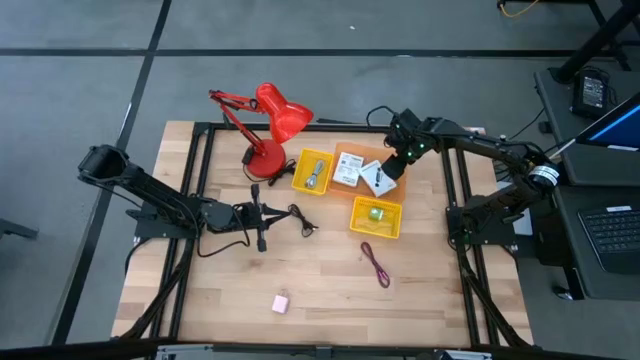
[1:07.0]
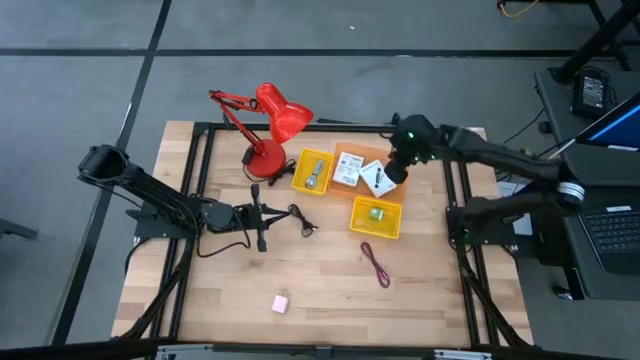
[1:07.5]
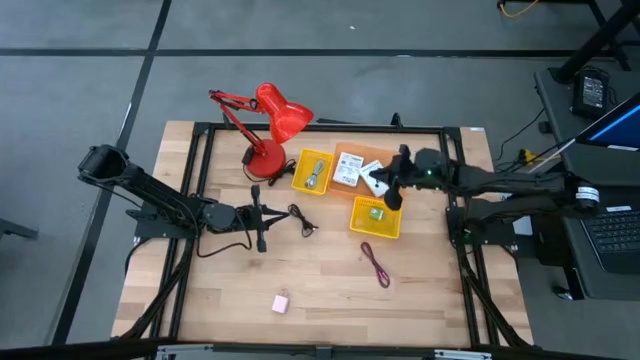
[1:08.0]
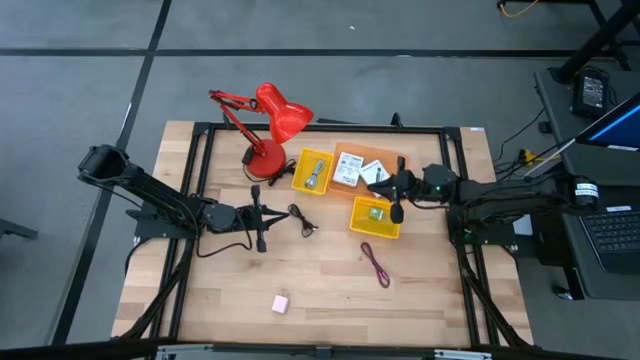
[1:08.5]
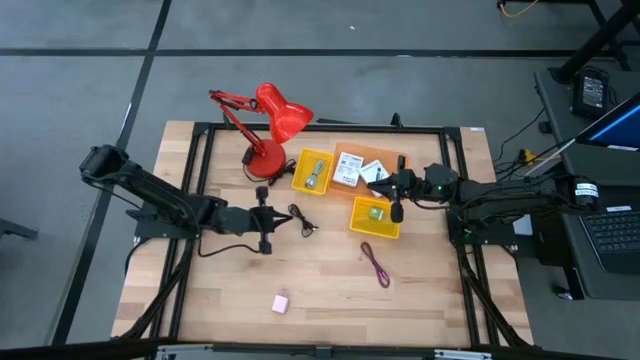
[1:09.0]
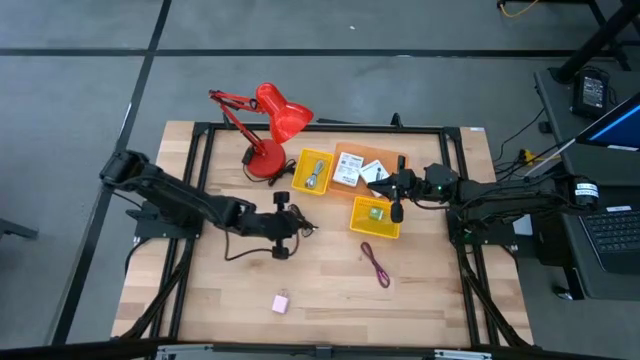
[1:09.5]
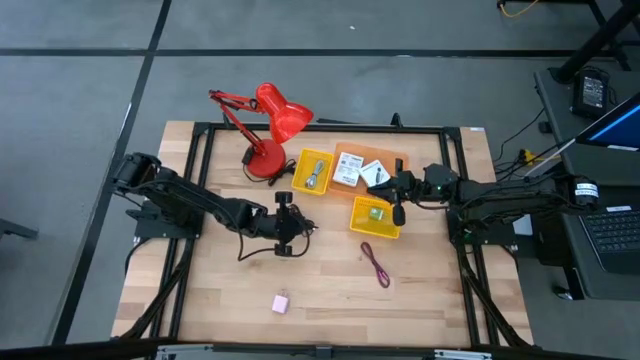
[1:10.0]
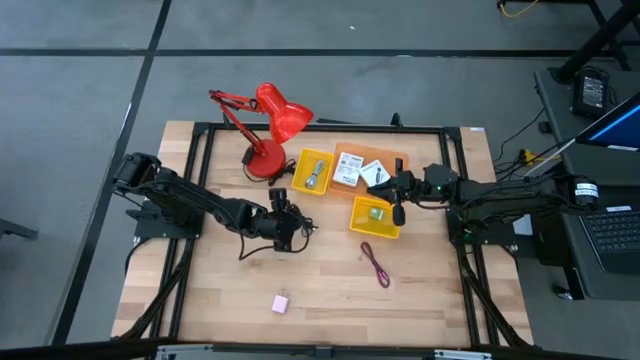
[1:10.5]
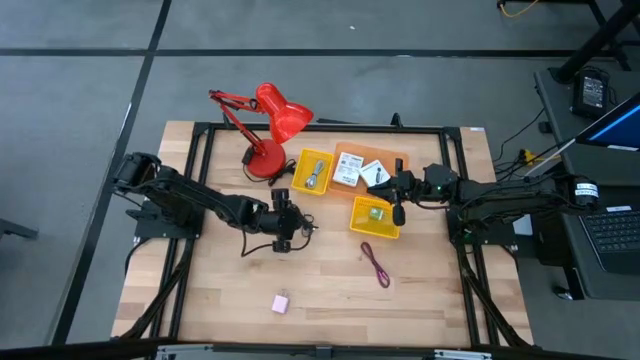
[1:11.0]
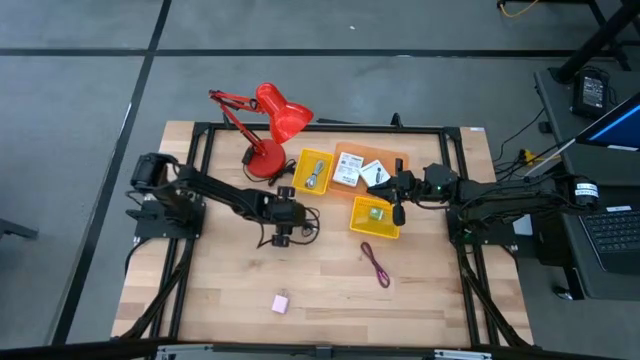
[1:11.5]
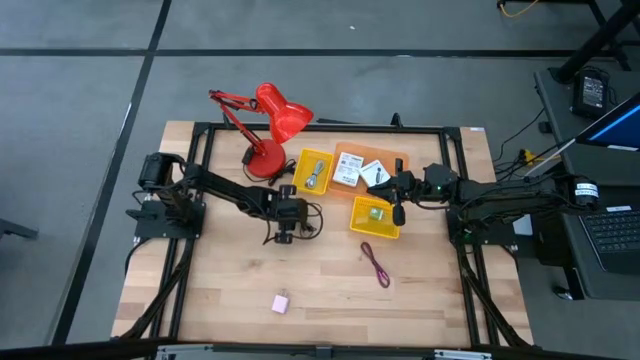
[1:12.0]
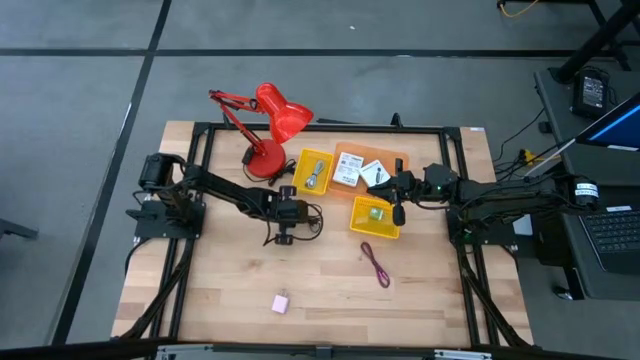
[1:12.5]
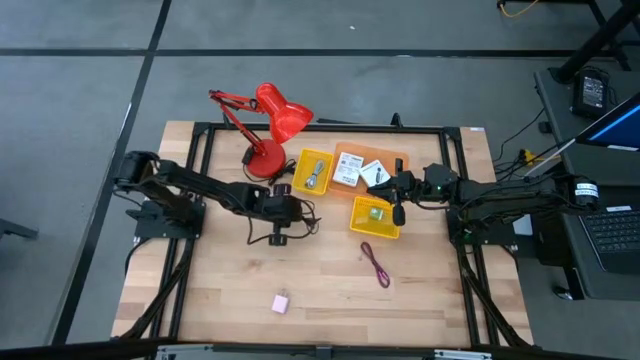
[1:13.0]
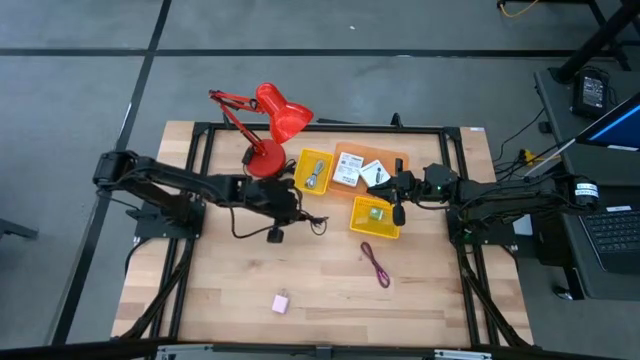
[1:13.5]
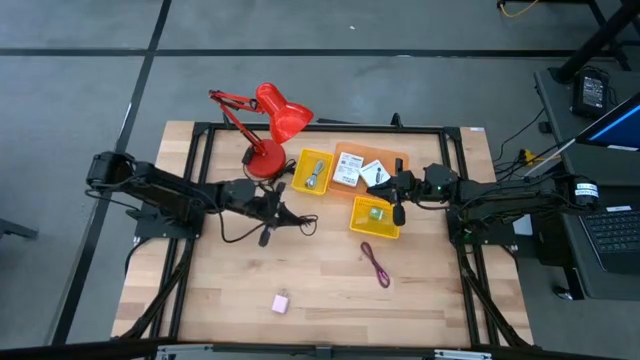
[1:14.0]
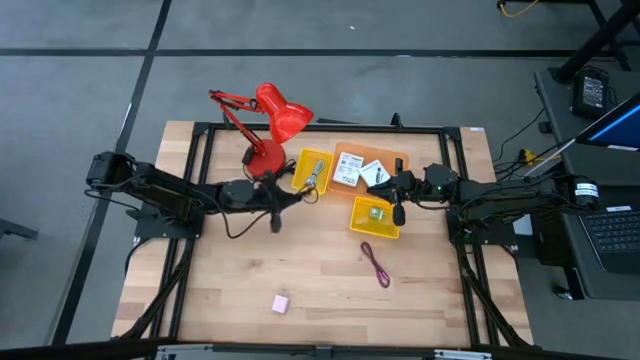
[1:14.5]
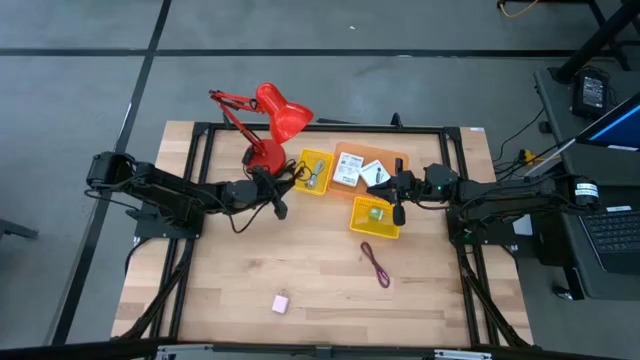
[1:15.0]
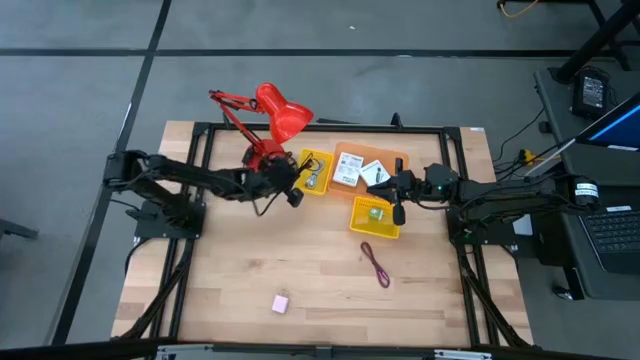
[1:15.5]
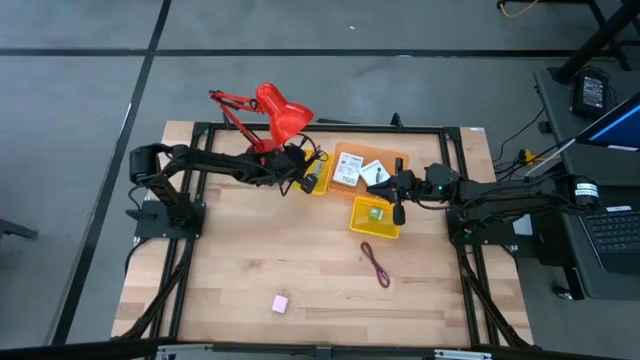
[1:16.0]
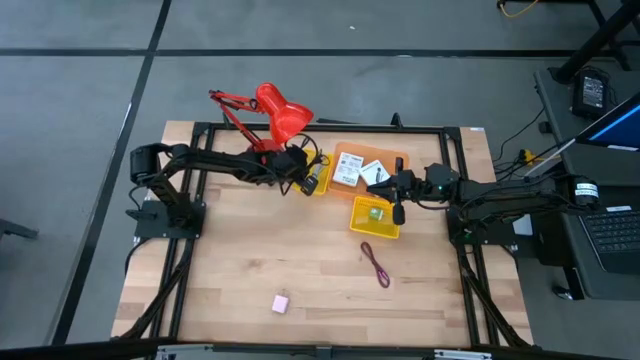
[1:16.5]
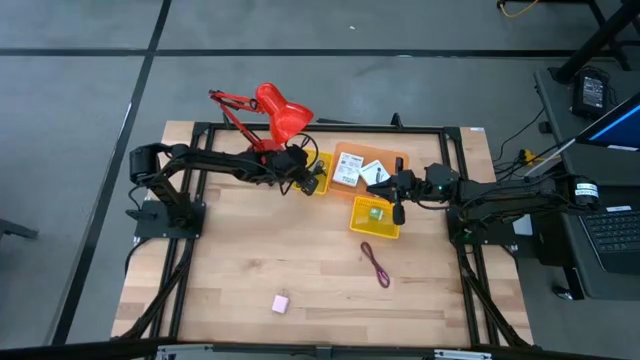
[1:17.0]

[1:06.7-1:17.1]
Task: Pick and place items into bin
Put the black cable into the left yellow basket

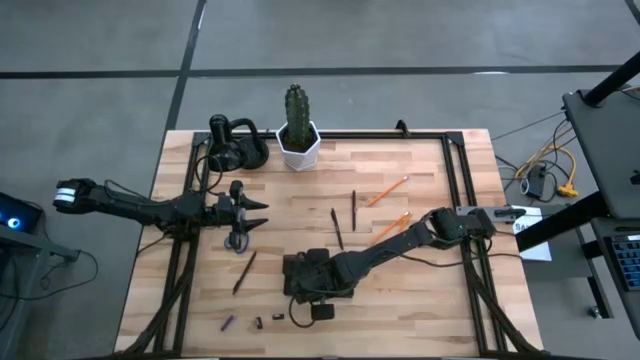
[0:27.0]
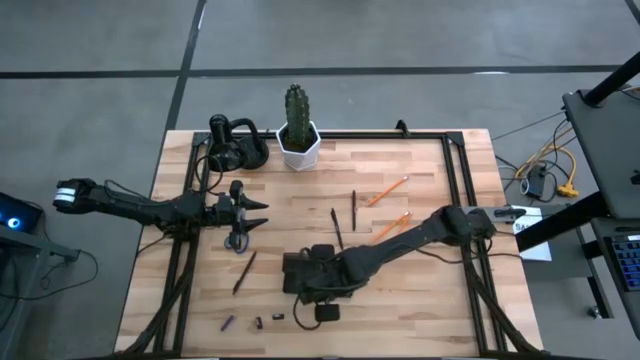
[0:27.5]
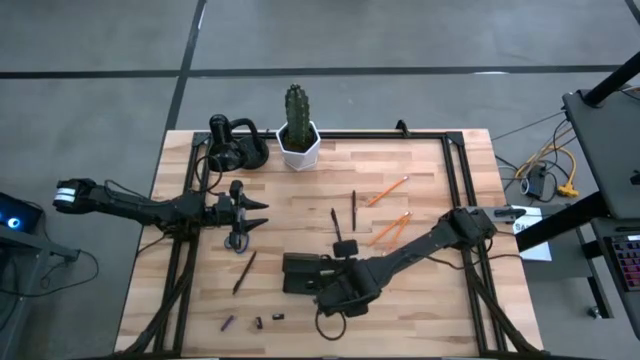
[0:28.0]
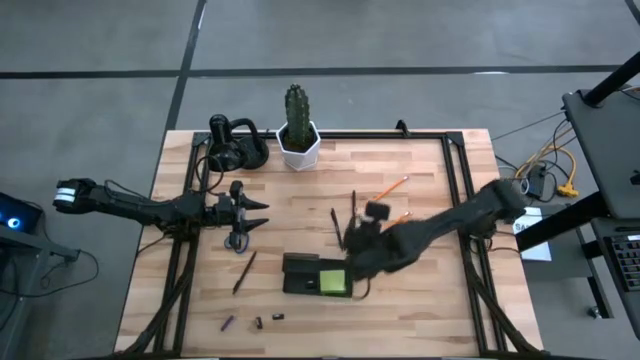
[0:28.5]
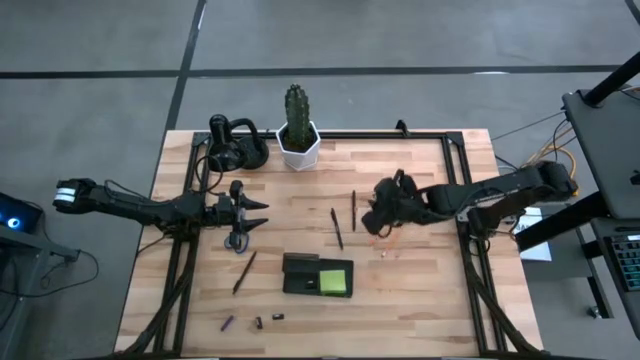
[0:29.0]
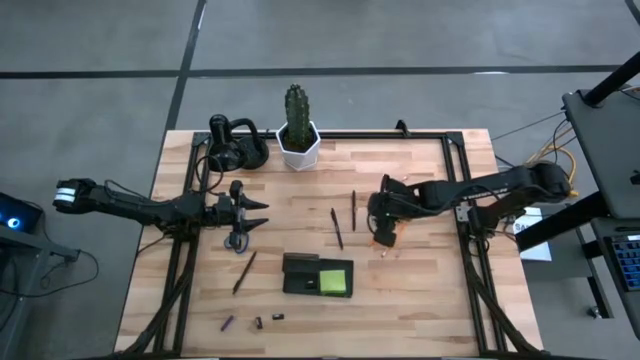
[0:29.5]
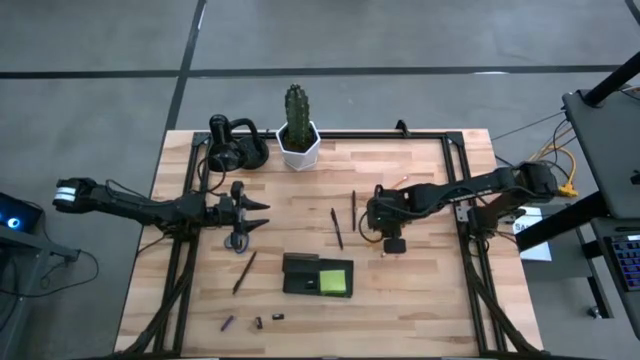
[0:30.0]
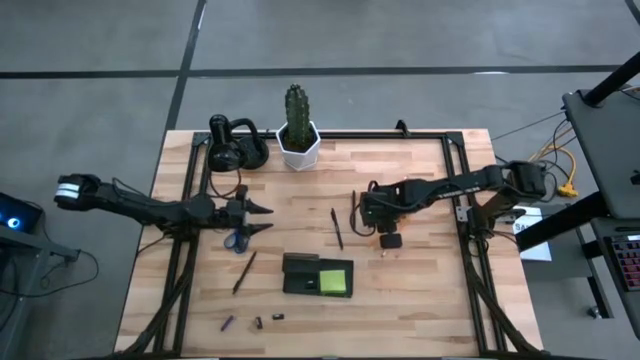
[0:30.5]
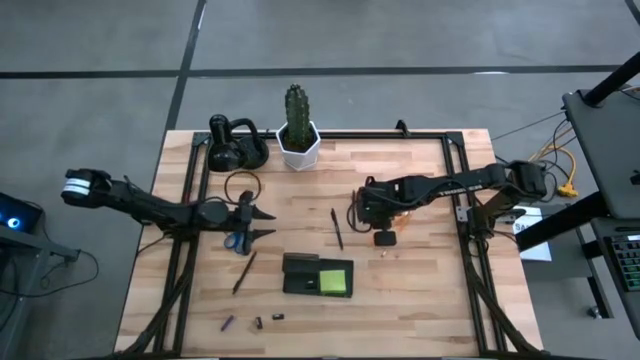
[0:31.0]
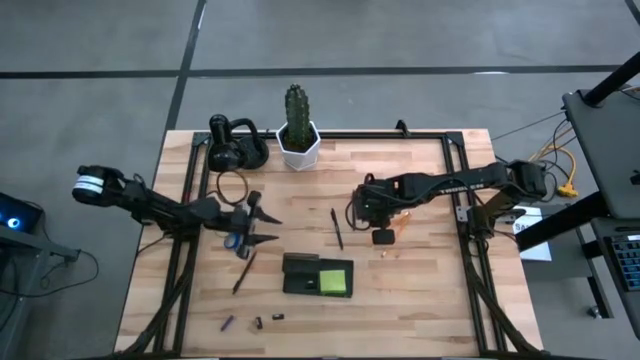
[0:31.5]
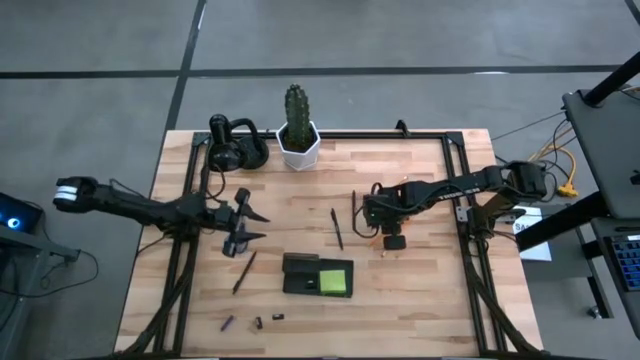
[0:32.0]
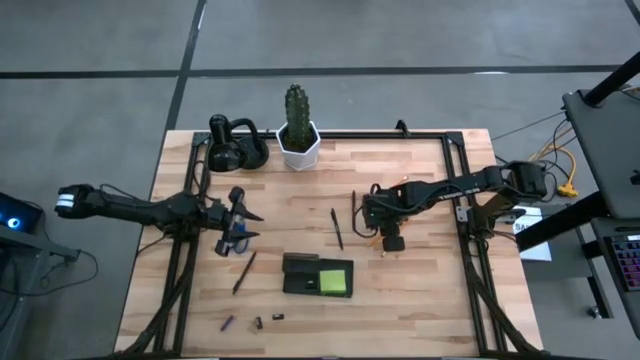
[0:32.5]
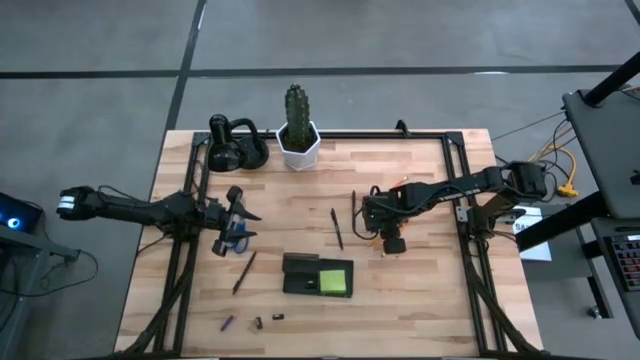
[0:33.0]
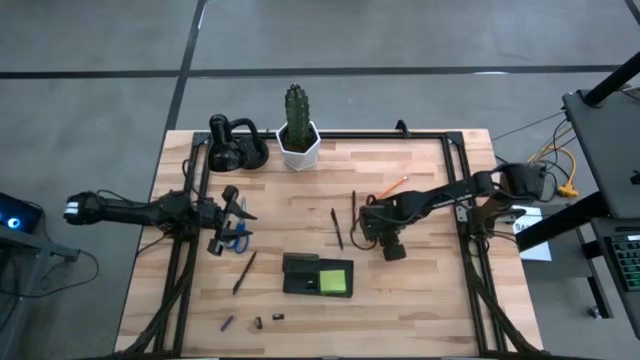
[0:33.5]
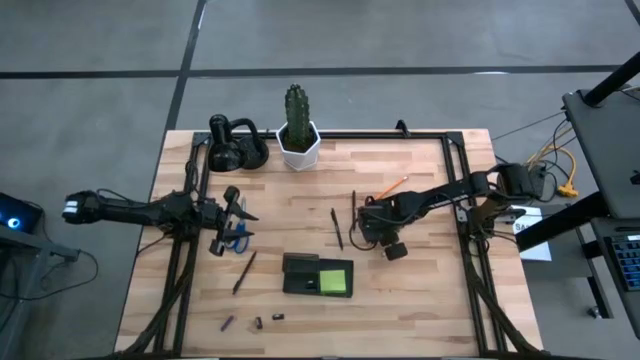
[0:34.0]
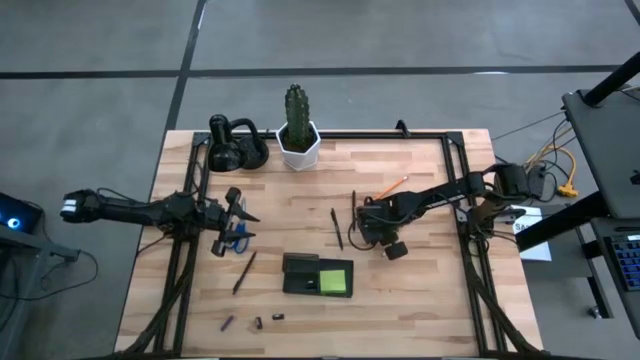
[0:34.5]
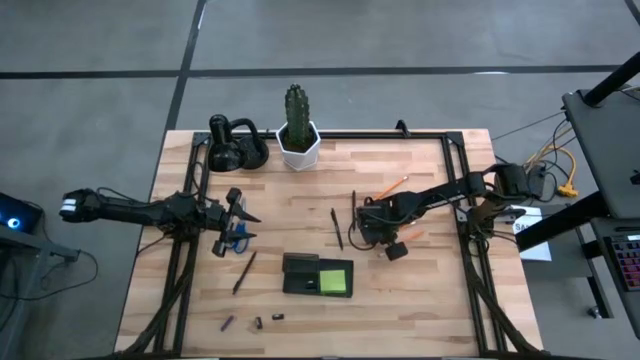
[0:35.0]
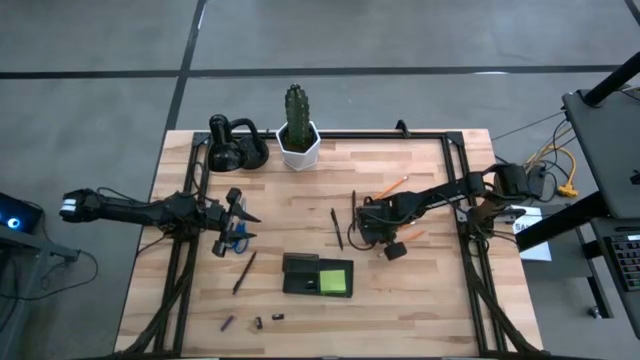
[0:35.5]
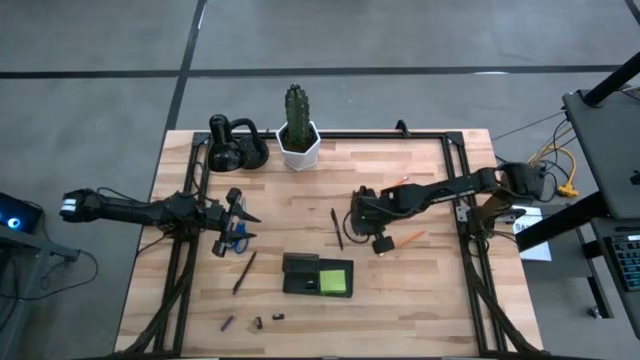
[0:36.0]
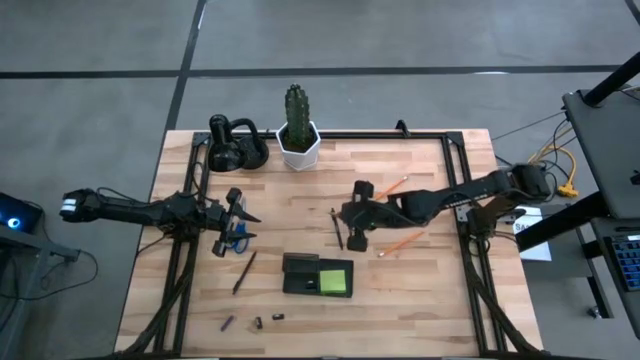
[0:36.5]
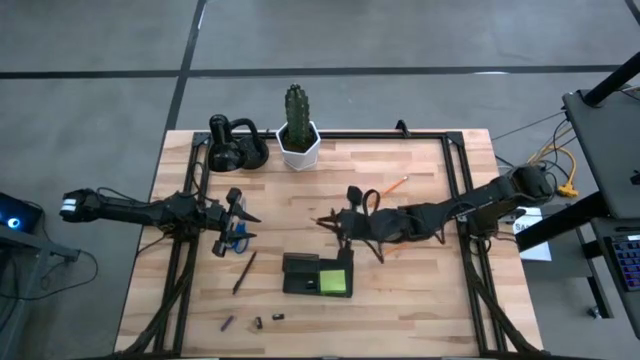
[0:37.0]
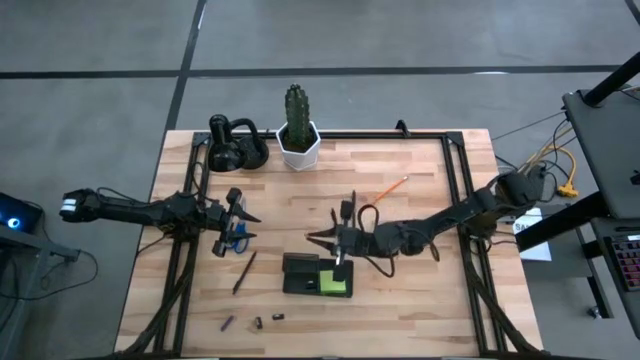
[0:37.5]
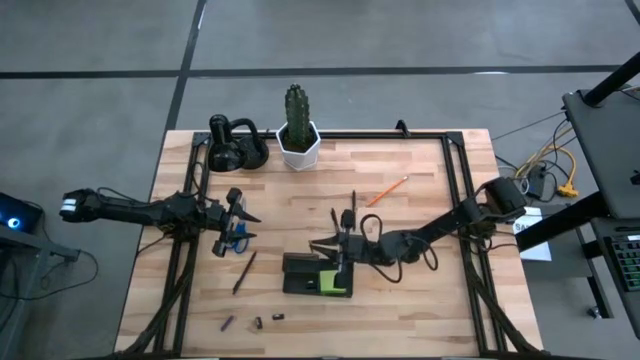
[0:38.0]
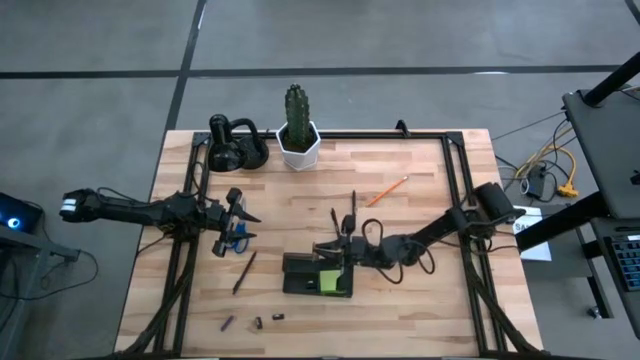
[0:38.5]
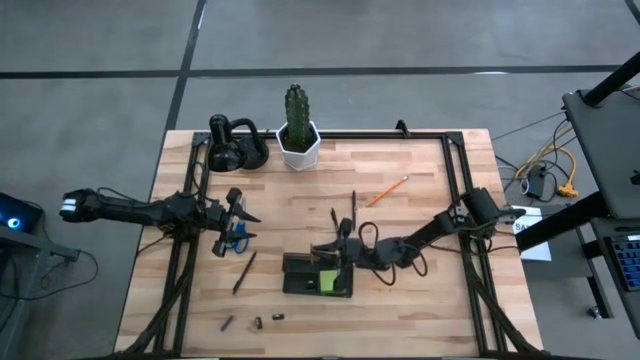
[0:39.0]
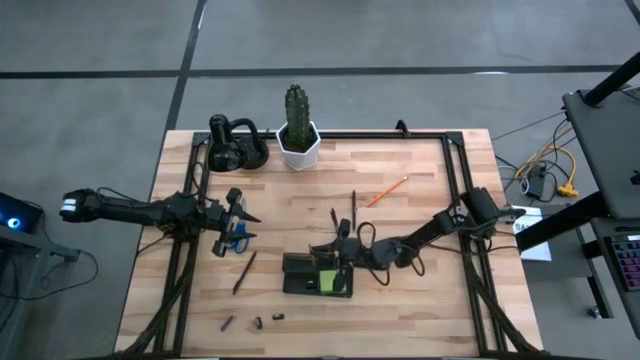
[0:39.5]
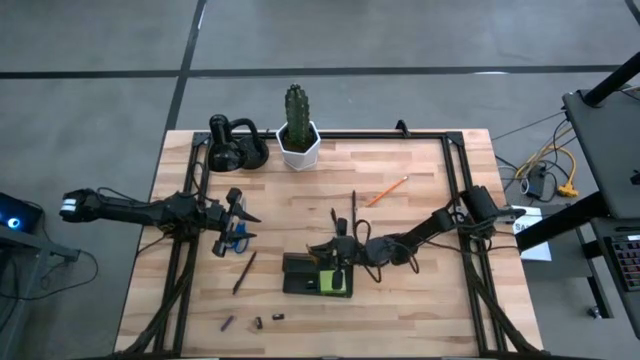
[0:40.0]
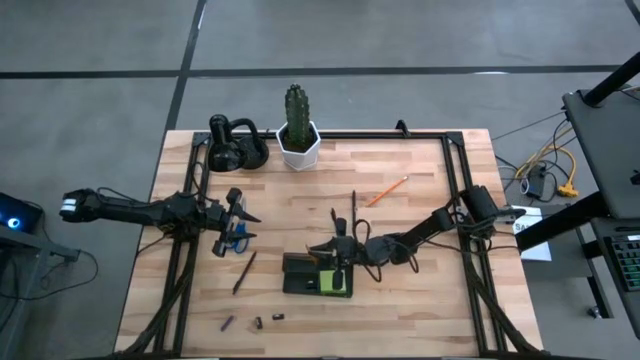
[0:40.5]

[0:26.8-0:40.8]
Task: Pick and place office supplies into organizer
Put the middle yellow pencil into the desk organizer
